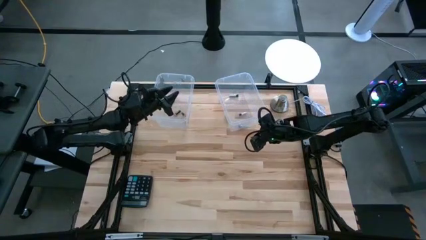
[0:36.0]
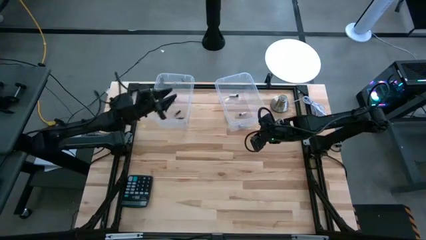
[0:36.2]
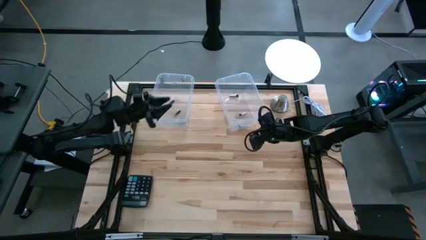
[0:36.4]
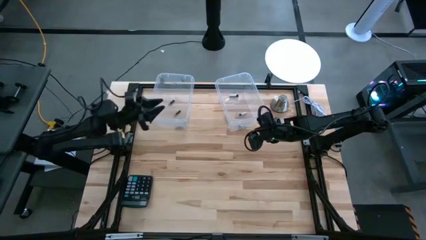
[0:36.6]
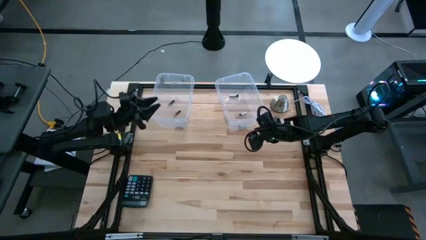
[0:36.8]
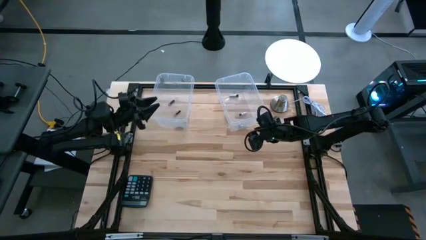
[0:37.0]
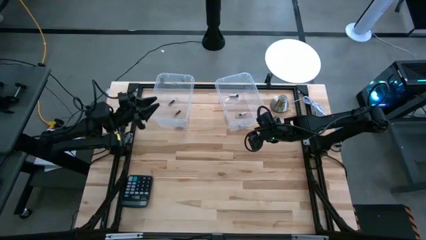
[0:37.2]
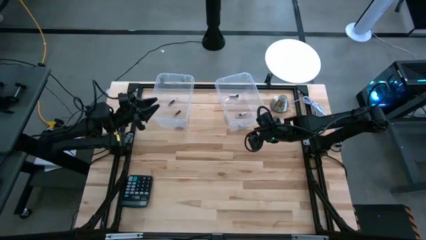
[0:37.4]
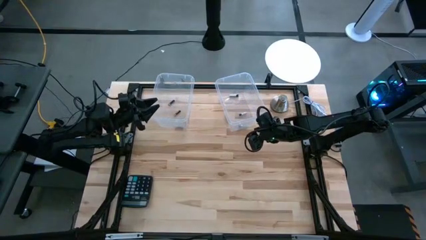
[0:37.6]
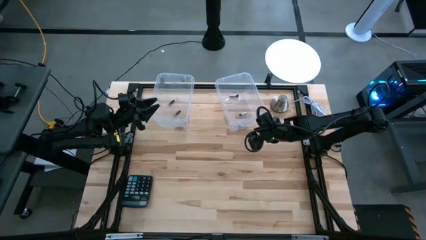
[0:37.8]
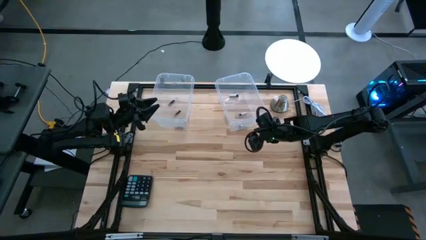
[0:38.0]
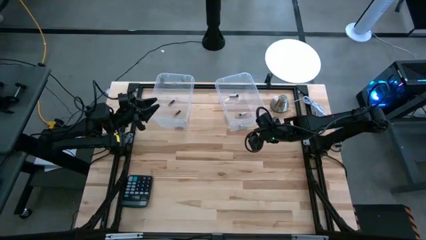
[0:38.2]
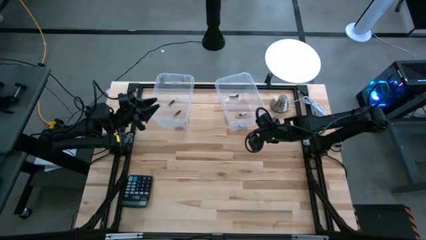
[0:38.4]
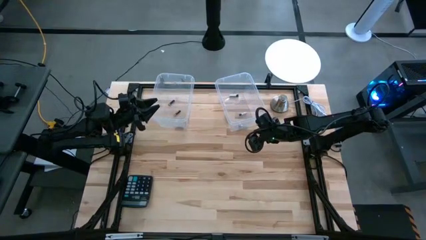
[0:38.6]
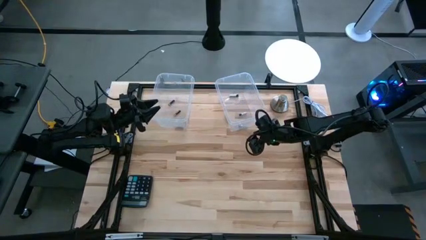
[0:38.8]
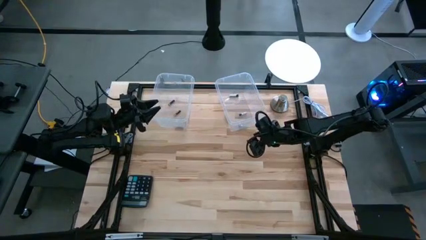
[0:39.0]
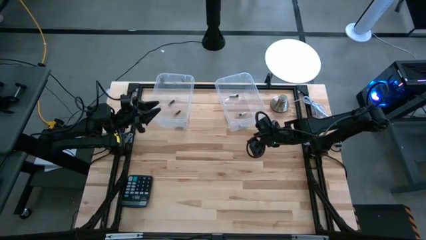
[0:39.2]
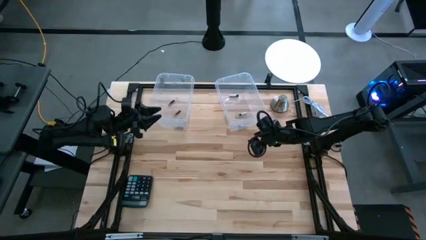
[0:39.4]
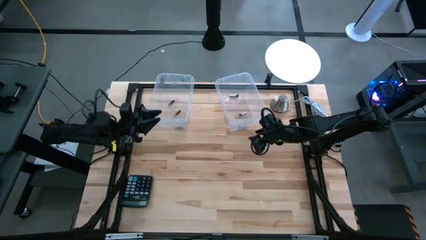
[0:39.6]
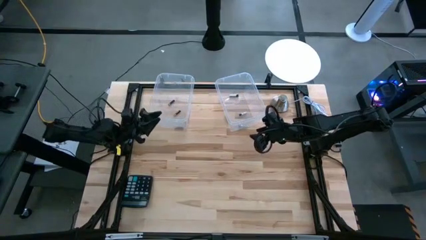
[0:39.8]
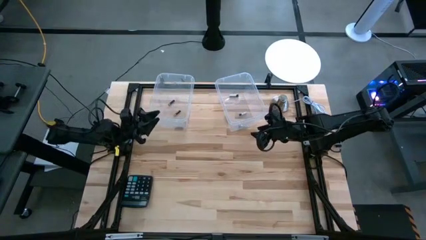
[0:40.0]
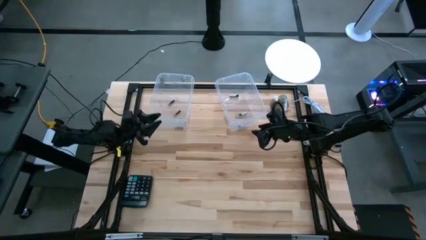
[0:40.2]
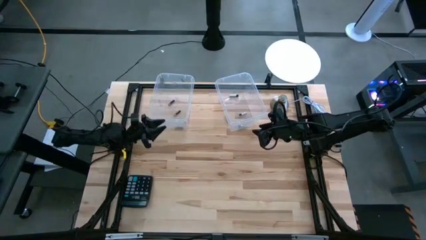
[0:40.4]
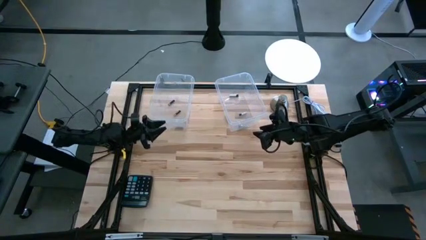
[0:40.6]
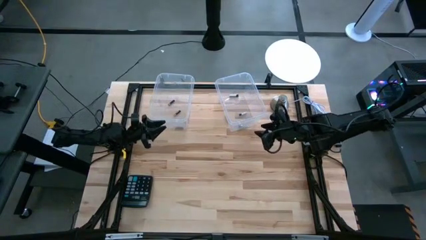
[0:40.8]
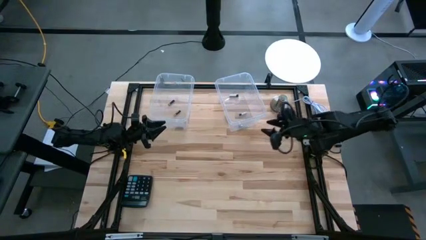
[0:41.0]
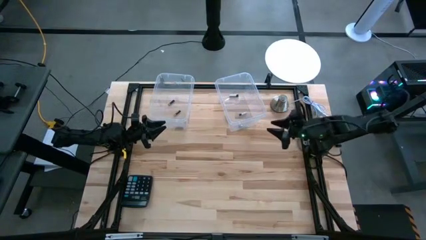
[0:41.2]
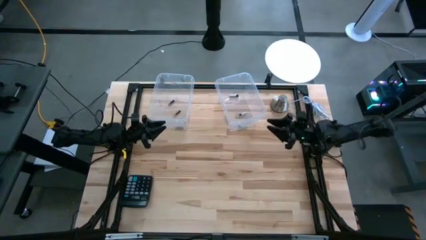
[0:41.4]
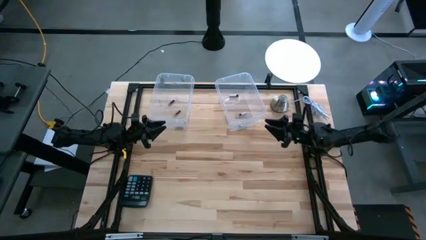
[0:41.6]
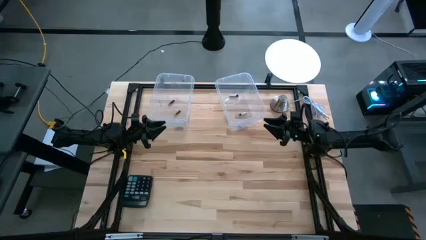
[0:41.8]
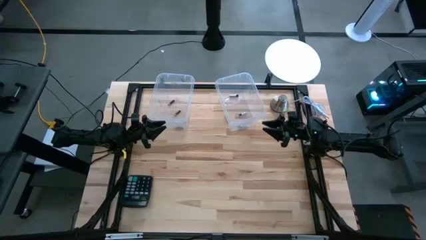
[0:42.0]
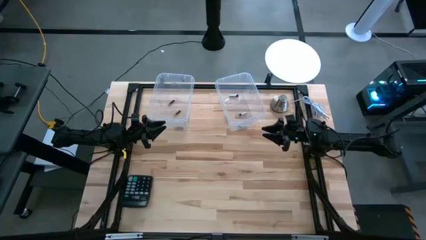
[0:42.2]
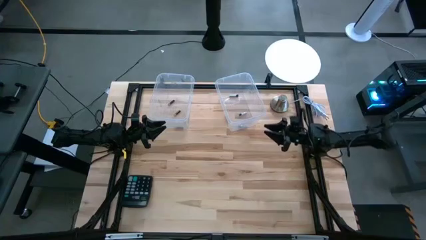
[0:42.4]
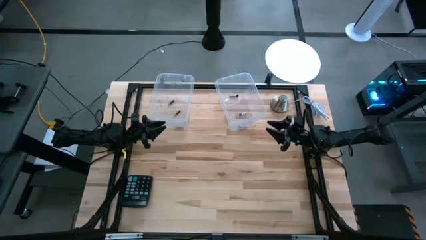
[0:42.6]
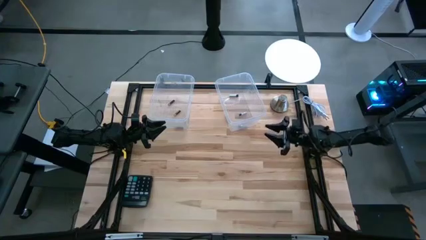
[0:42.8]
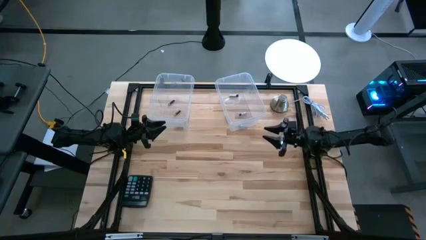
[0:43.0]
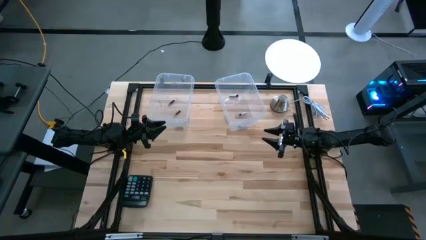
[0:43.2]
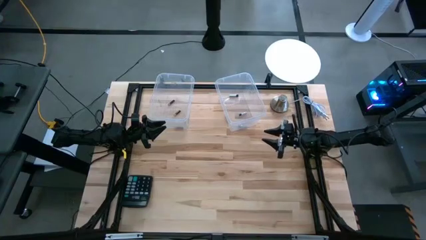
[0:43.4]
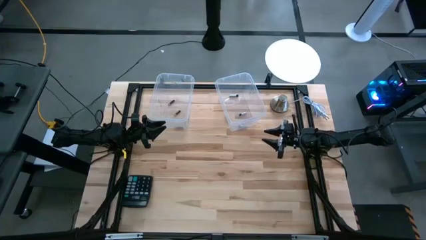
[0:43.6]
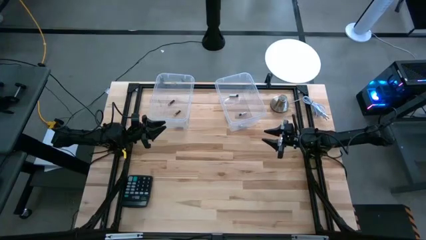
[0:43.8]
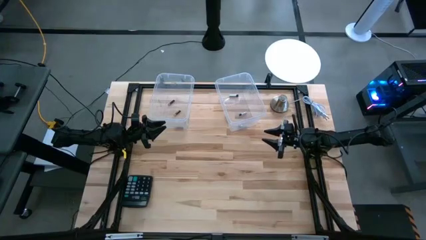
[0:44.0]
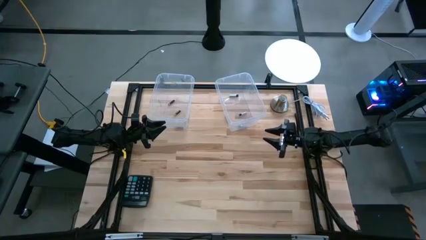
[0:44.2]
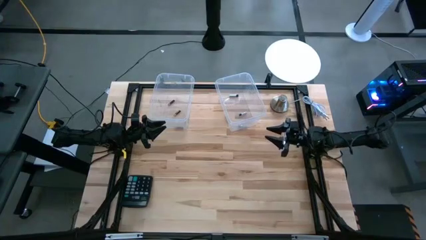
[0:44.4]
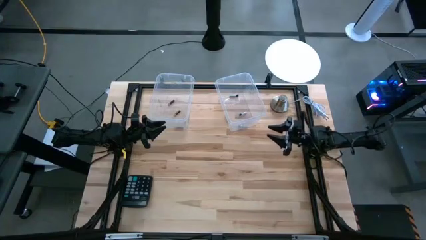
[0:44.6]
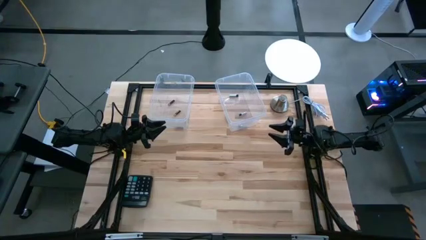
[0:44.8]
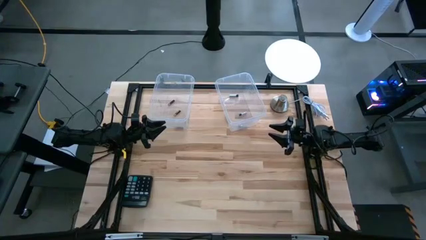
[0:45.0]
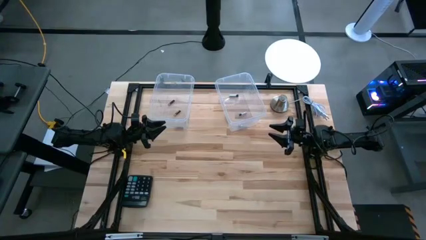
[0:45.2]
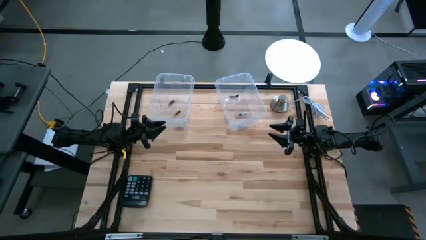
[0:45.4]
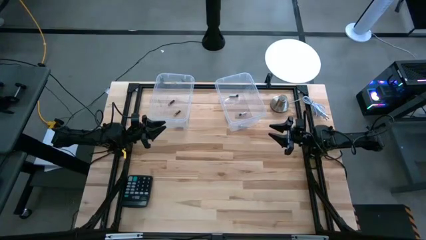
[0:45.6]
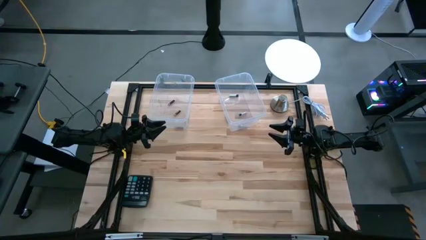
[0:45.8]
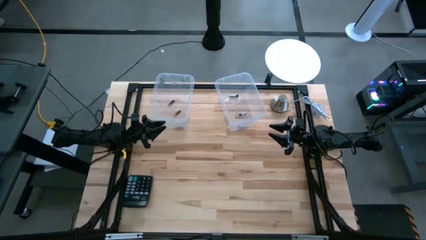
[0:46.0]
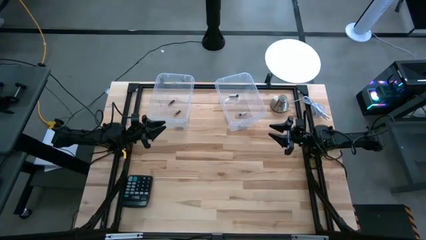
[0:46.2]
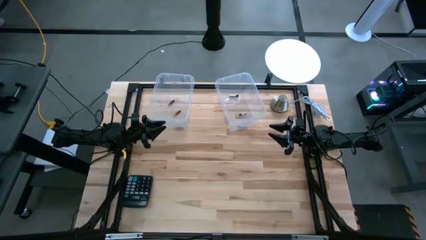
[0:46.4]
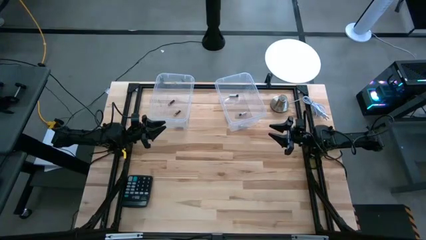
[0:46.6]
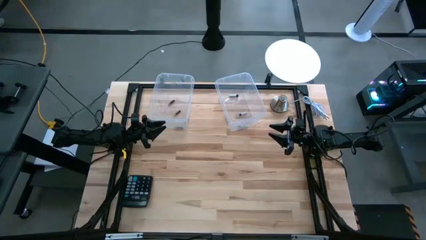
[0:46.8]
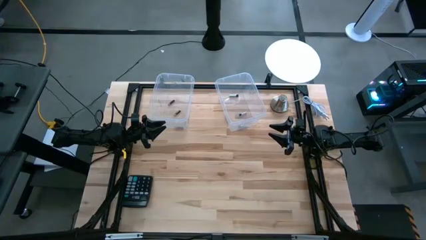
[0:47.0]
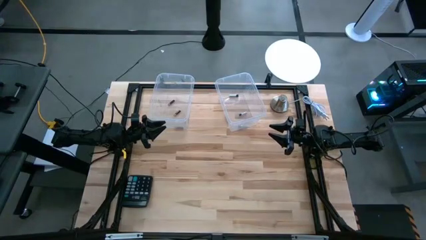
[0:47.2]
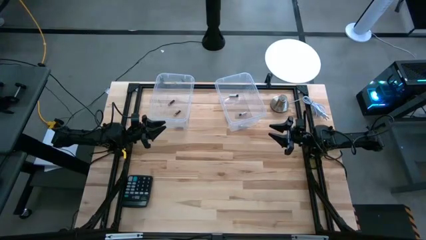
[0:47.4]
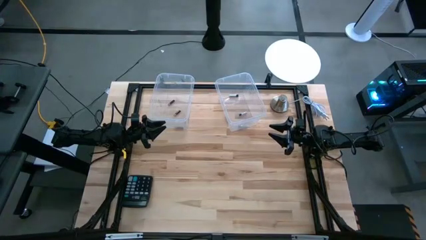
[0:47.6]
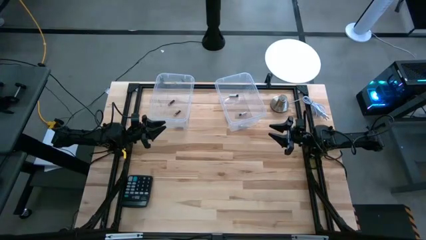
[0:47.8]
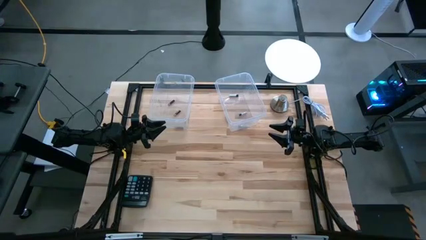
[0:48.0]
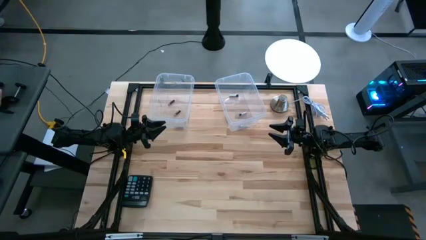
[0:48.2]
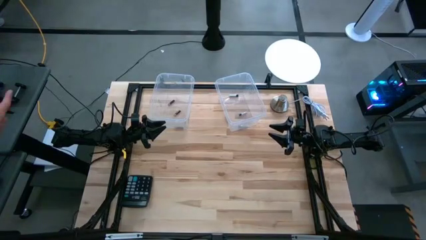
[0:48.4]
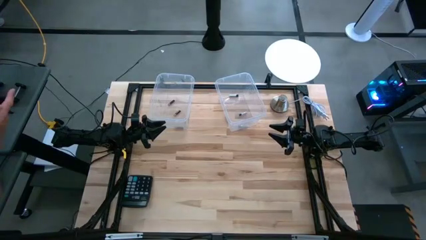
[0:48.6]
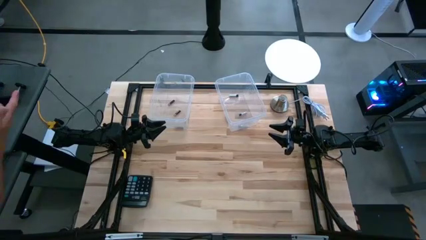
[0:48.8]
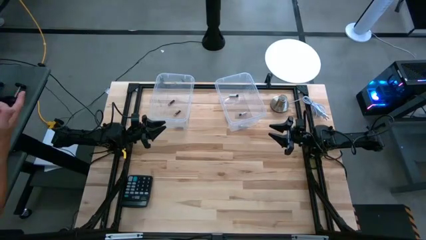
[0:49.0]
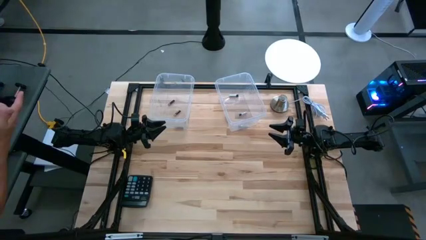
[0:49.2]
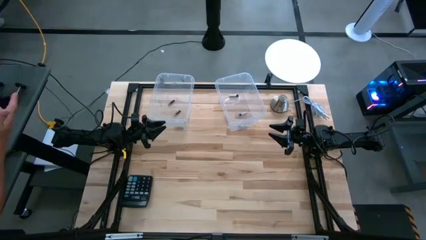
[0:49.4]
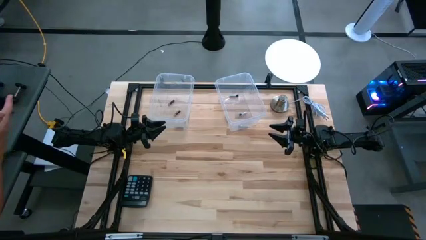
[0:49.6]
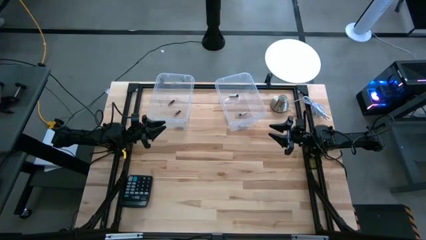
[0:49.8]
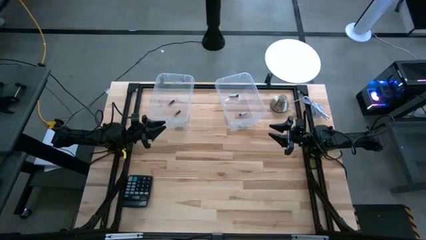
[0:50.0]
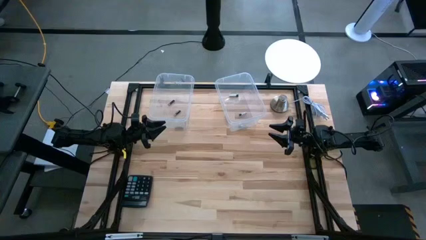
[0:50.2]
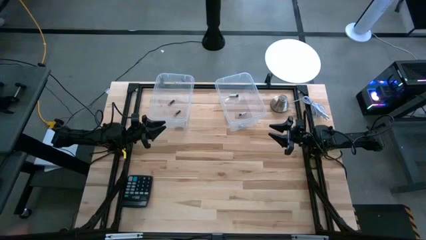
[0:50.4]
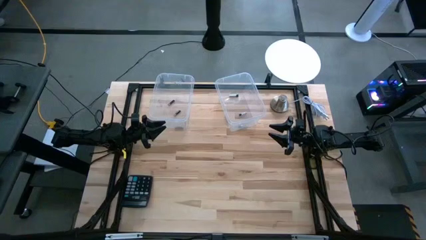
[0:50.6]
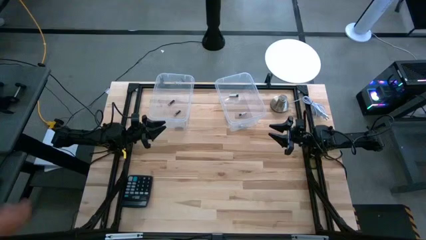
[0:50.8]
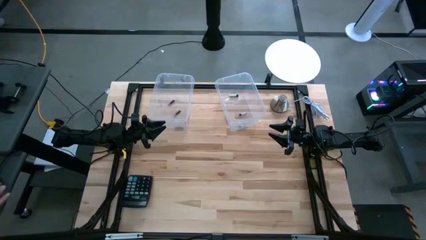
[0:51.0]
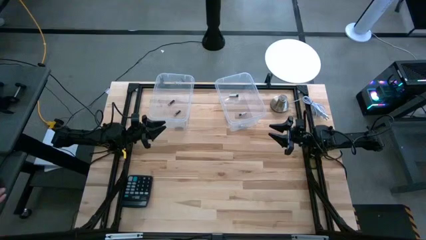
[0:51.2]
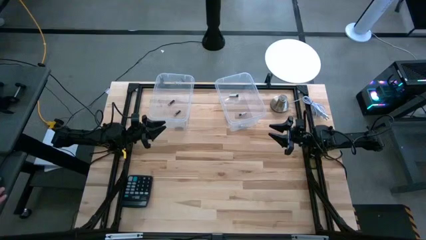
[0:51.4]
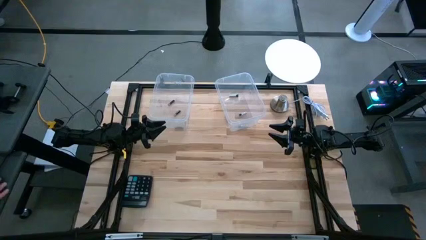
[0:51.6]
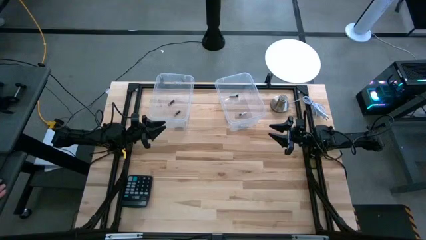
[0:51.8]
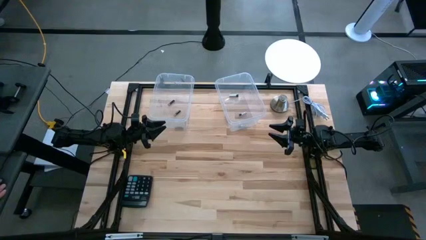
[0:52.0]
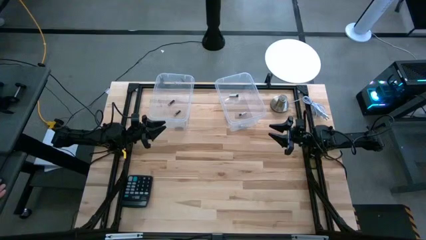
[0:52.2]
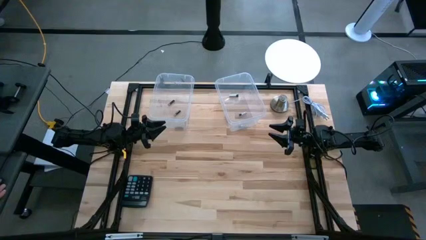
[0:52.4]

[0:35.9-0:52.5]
Task: Sort batteries
Return to Home Position

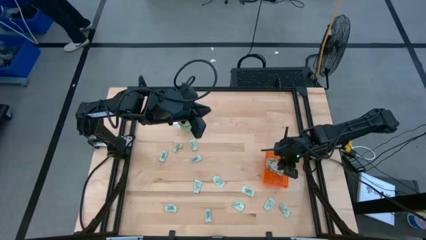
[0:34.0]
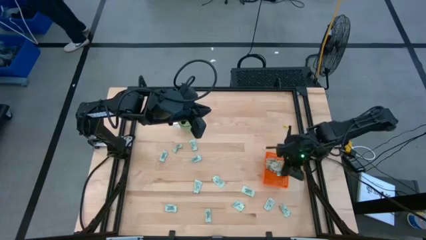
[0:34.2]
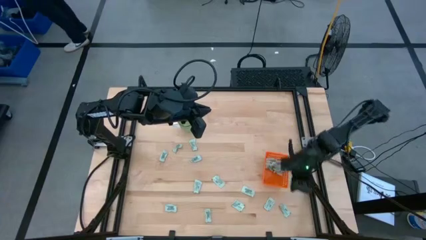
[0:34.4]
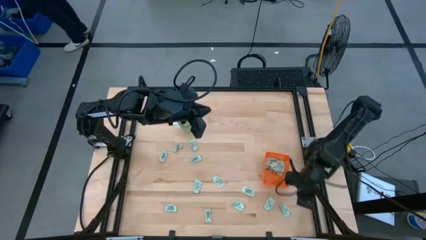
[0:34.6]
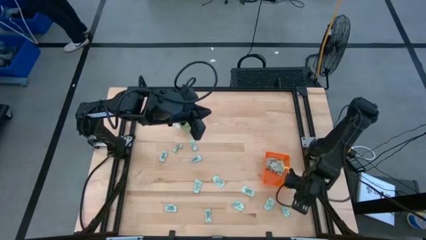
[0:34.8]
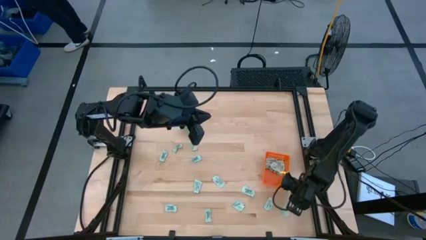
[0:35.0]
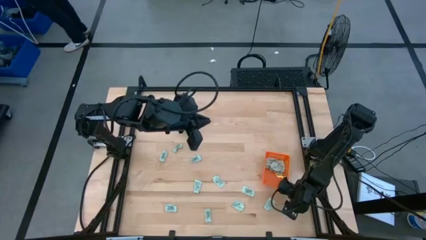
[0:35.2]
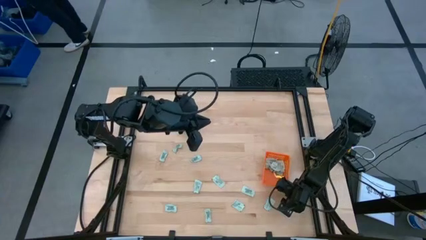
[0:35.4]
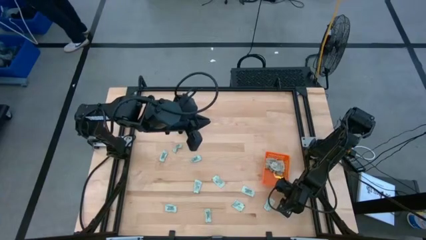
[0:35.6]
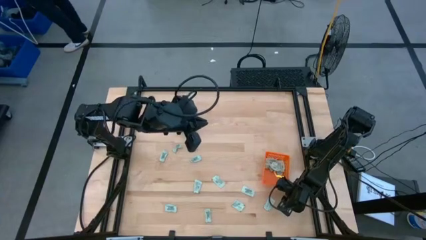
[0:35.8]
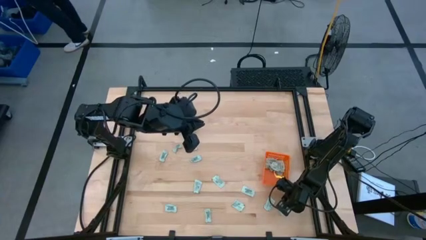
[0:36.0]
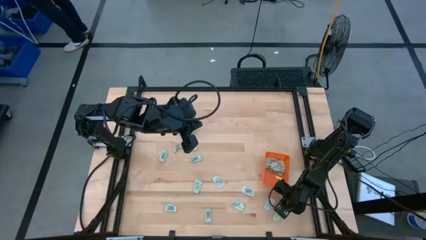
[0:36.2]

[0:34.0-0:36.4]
Task: Pick and place Stevia / Truvia into bins
Put the stevia packet into the orange basket
